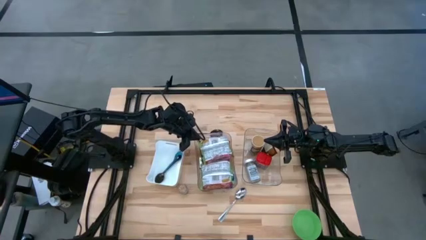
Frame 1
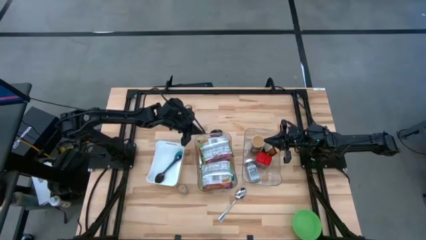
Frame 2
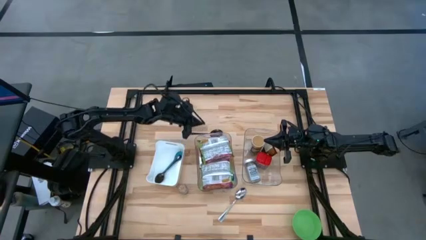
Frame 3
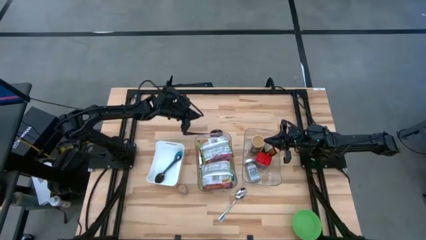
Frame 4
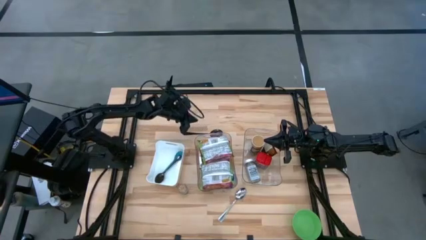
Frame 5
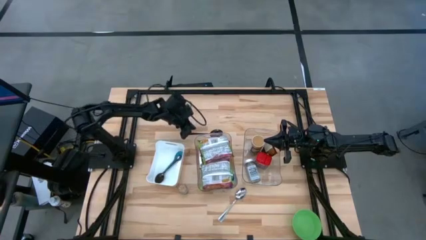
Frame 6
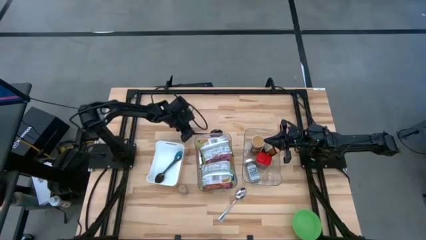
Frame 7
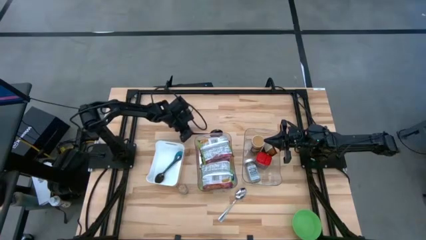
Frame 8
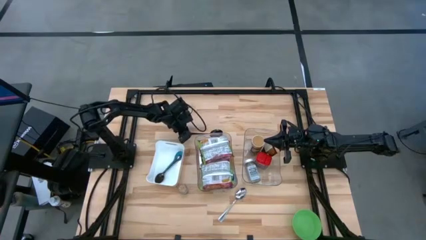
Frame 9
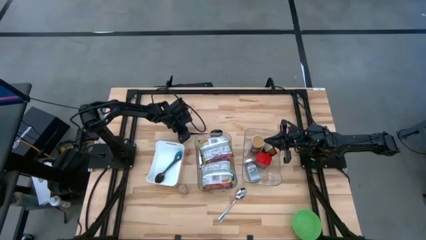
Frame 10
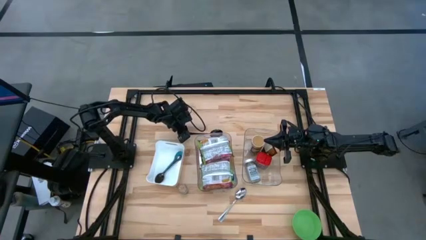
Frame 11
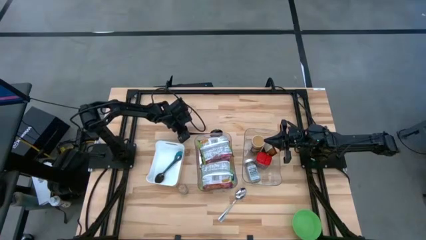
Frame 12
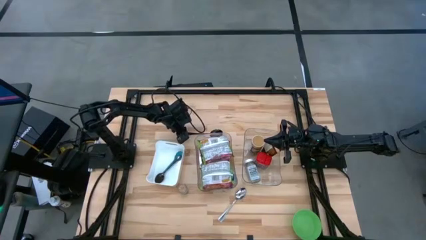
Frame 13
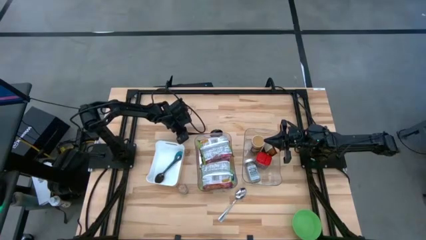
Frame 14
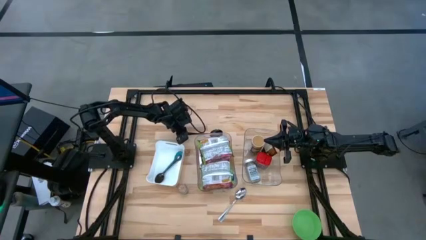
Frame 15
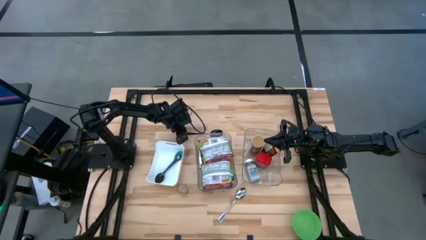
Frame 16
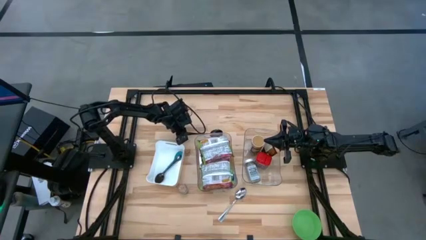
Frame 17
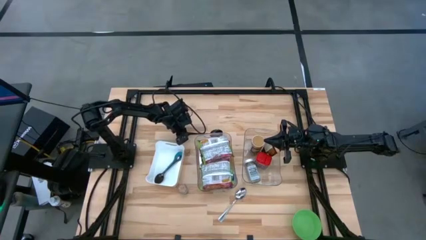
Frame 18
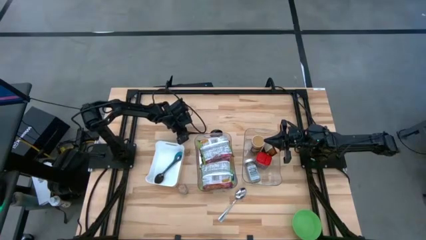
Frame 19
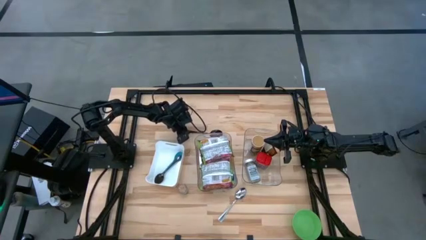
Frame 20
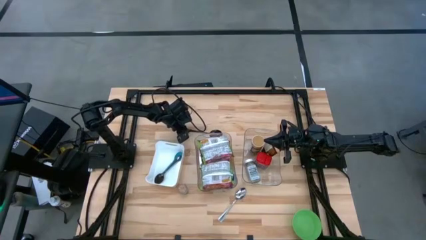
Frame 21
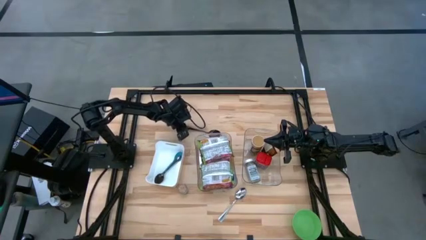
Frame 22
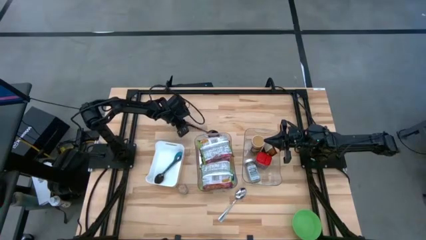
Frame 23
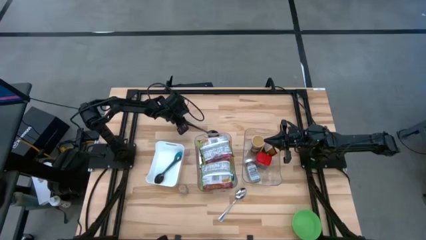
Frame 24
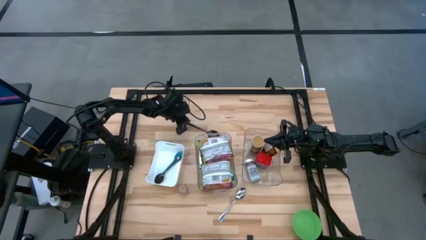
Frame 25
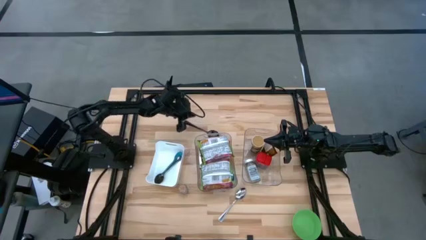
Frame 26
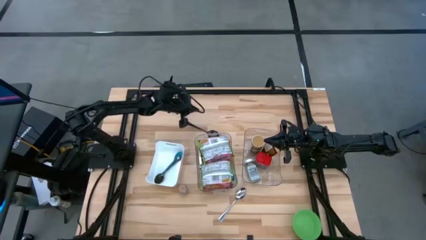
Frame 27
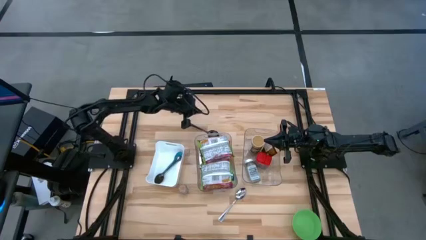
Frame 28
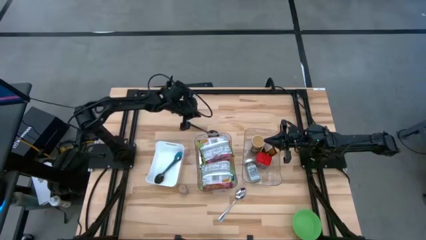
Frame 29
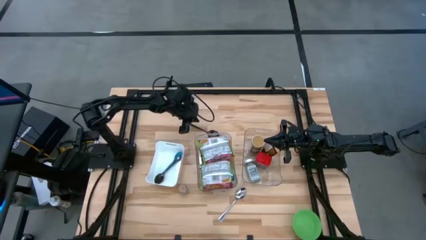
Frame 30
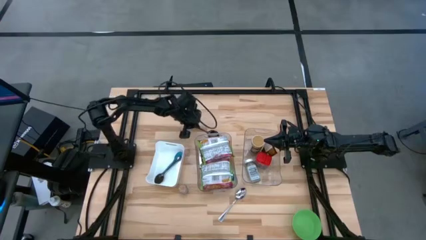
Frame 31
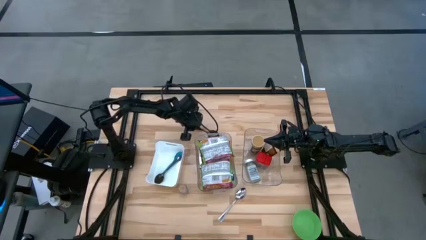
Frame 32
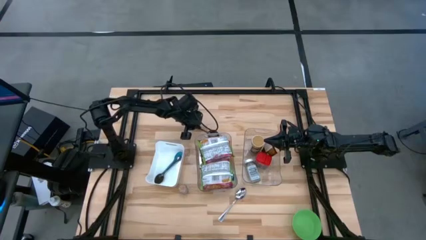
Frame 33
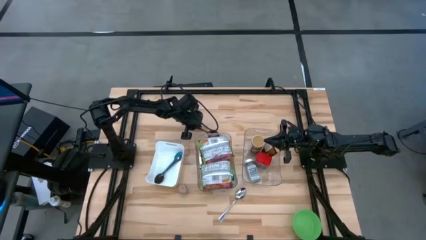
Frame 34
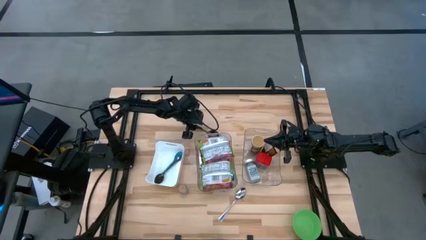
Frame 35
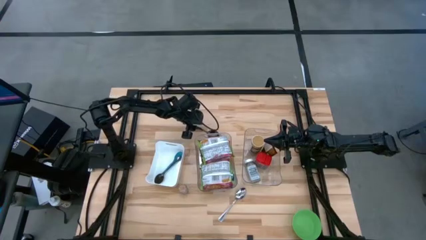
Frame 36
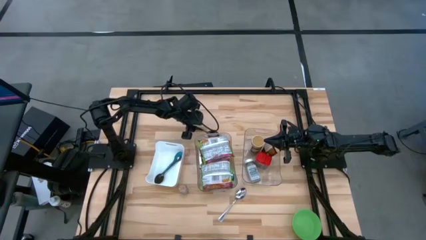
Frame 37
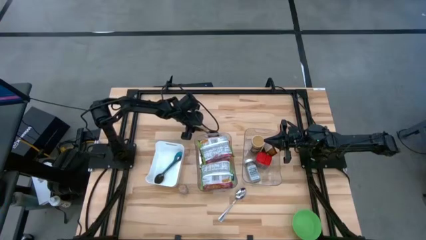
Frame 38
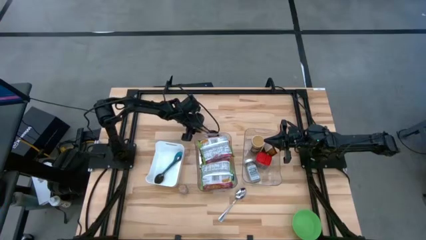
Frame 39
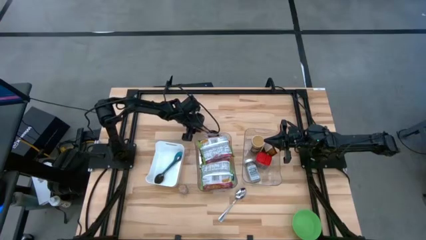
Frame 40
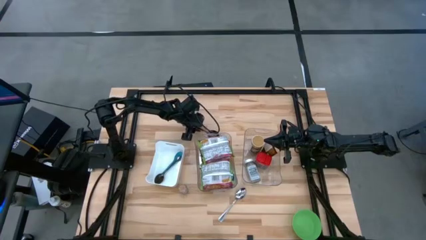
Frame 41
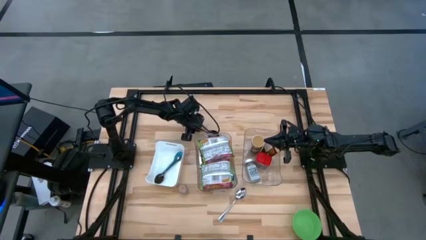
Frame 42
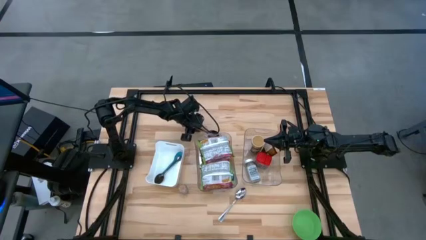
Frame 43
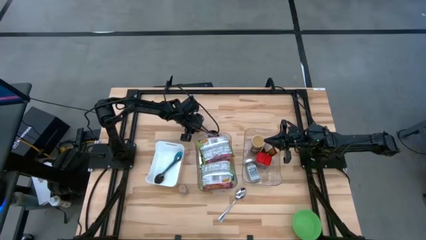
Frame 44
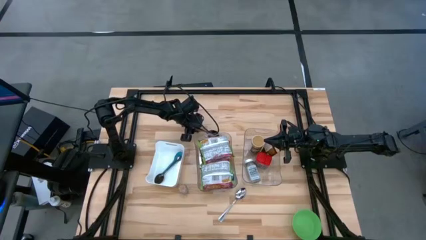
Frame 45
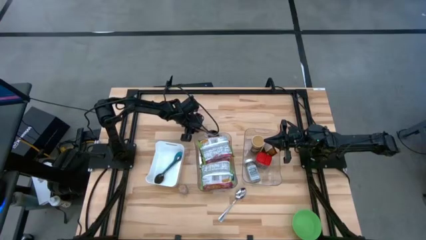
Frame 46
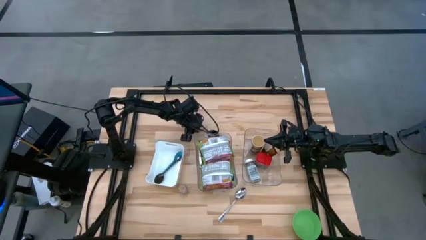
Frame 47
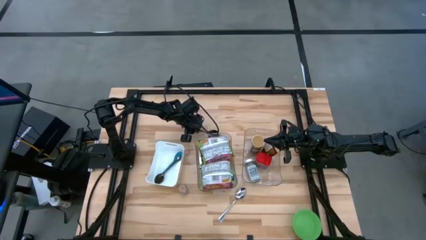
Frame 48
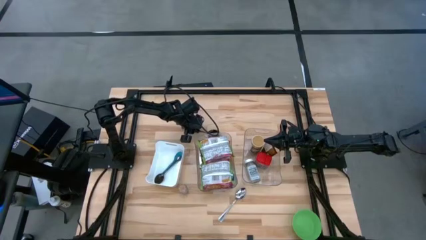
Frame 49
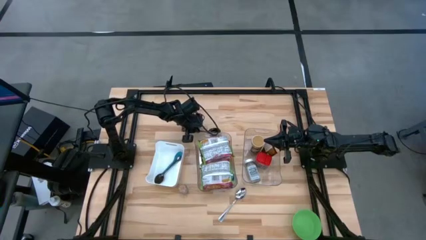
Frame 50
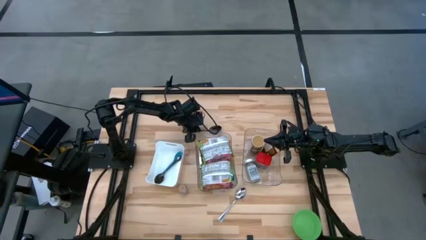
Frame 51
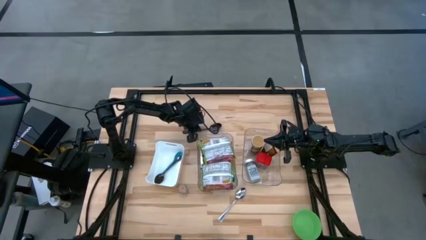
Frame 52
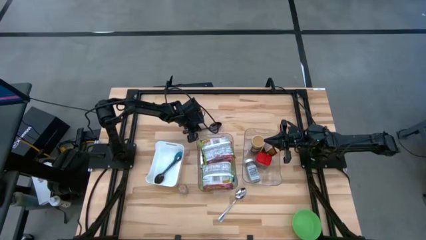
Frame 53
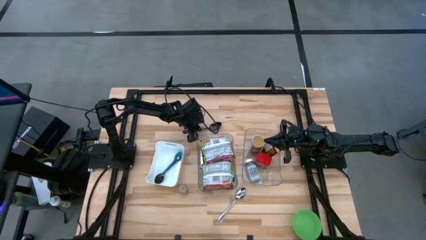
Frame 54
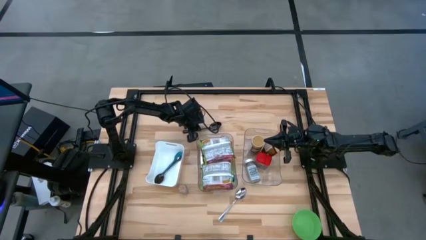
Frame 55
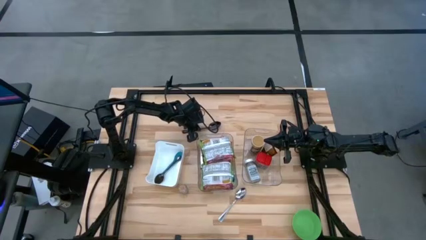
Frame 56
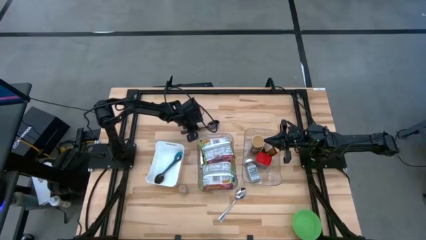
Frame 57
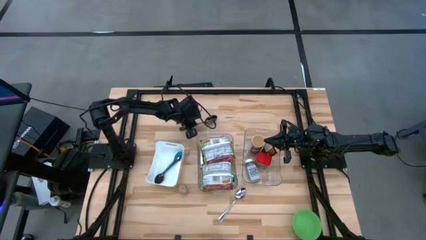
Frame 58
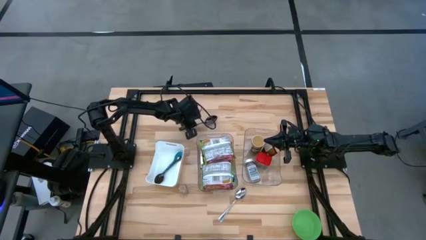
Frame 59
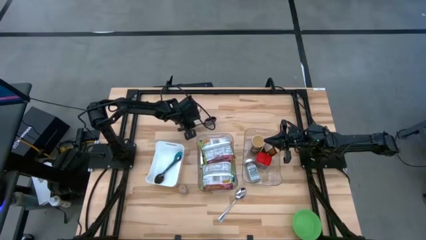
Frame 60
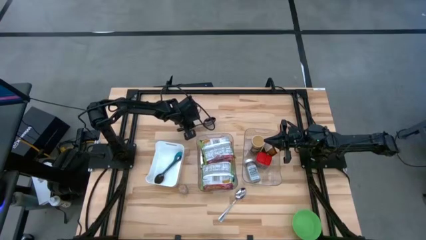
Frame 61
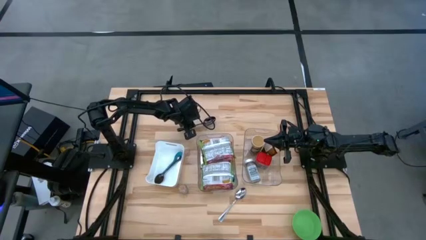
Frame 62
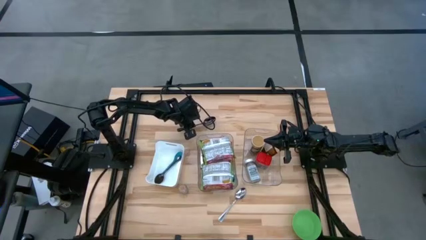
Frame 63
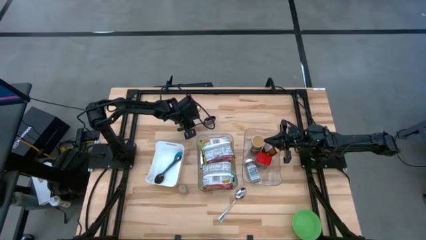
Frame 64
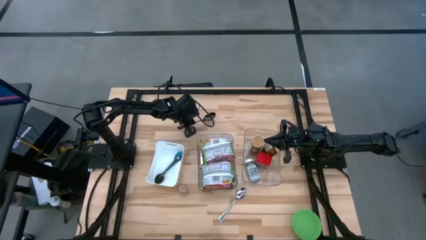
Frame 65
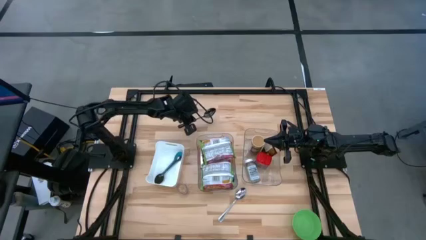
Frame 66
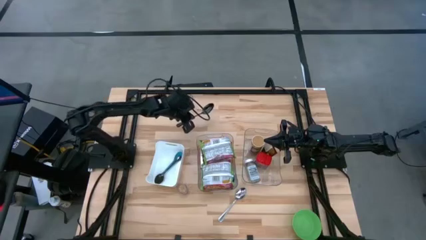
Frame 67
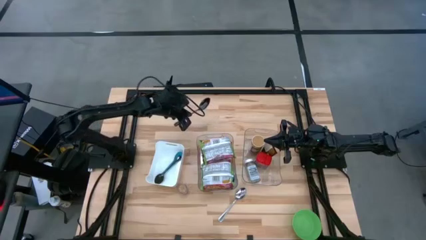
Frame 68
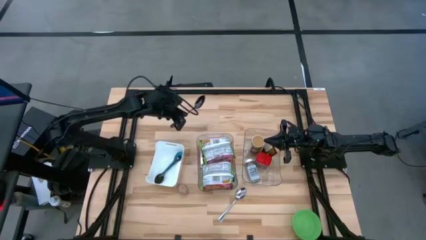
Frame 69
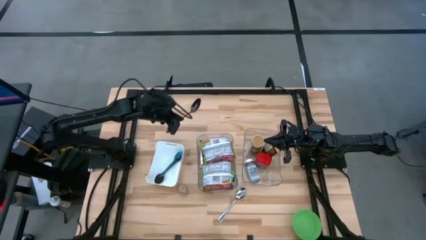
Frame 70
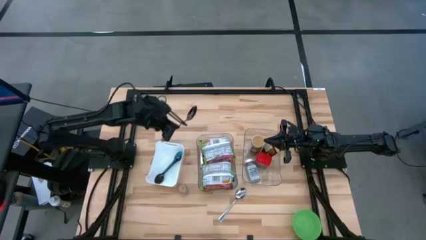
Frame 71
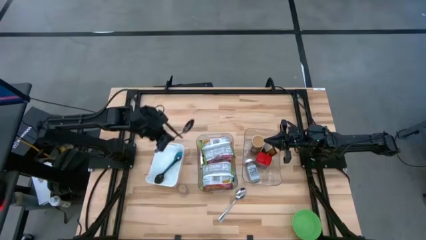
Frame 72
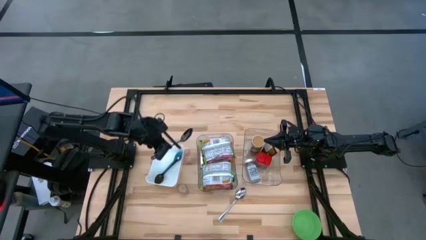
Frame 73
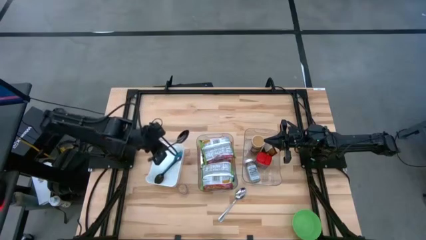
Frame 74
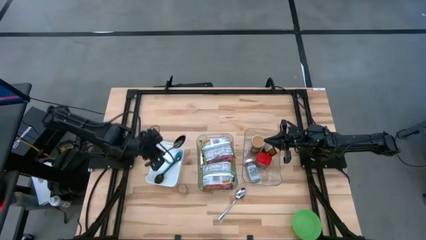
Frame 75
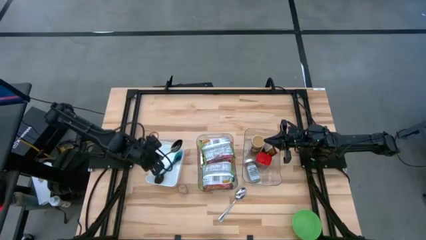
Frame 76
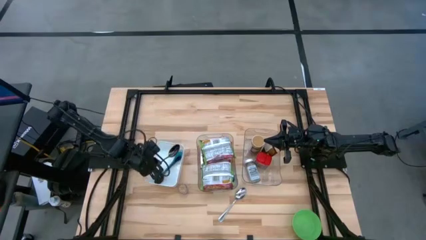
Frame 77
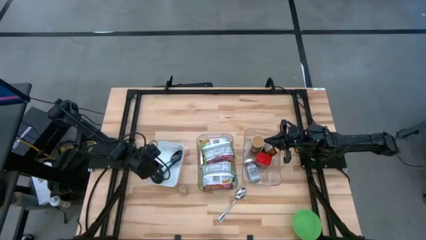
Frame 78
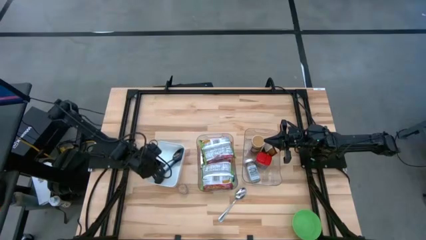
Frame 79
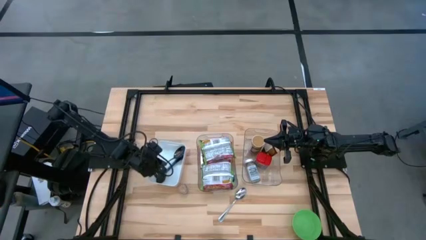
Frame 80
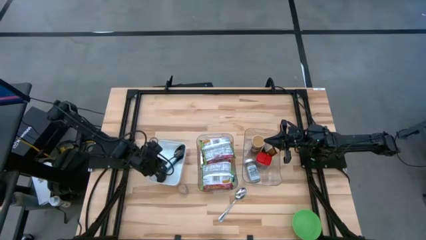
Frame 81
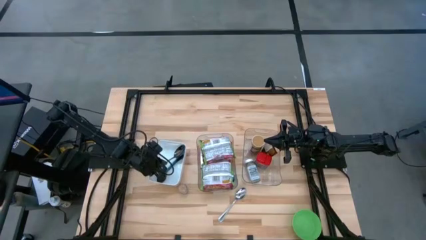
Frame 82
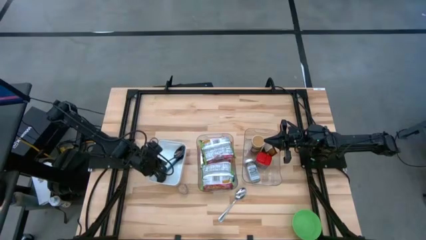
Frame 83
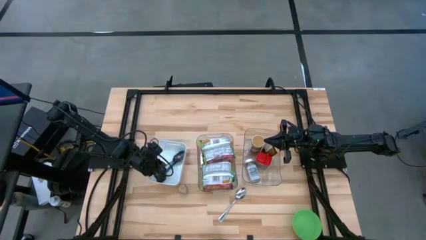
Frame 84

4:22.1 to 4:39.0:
Task: Pick & Place Food Item
Put the black spoon into the white bin
